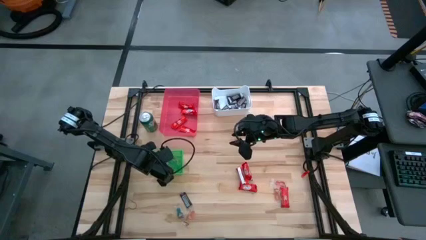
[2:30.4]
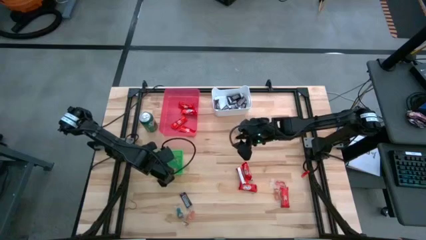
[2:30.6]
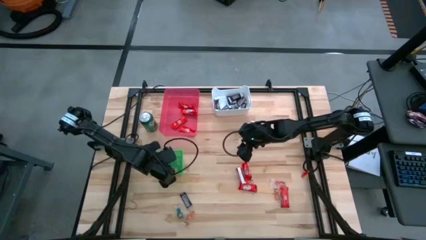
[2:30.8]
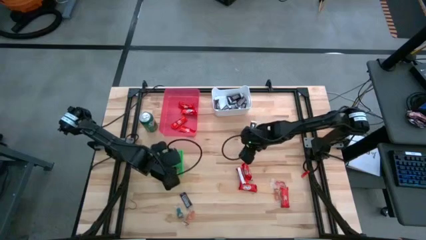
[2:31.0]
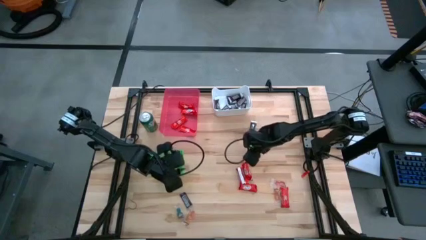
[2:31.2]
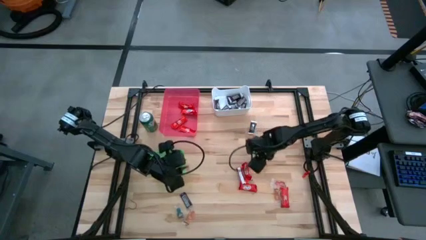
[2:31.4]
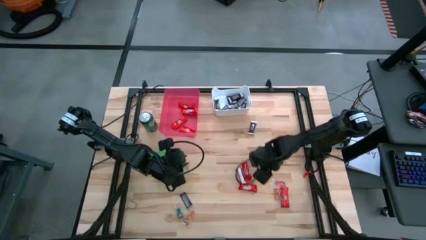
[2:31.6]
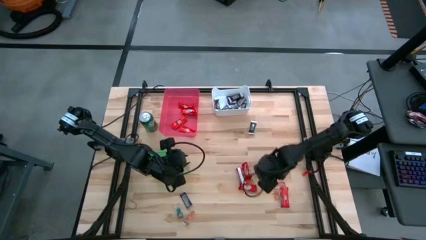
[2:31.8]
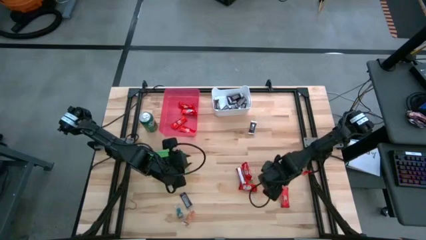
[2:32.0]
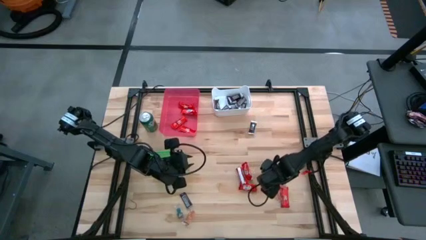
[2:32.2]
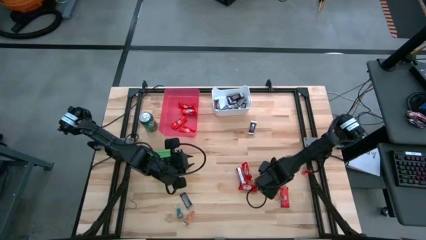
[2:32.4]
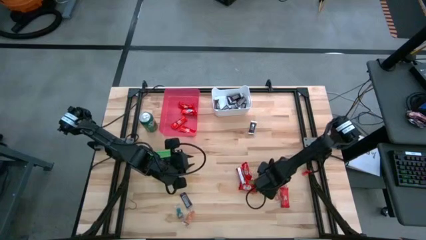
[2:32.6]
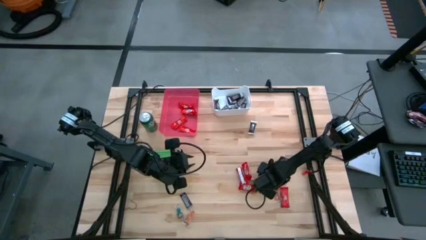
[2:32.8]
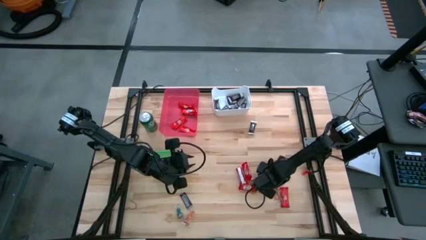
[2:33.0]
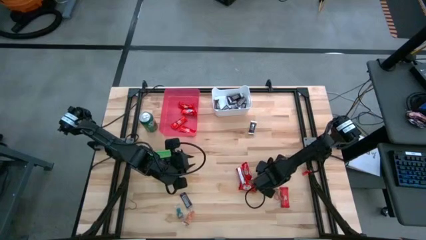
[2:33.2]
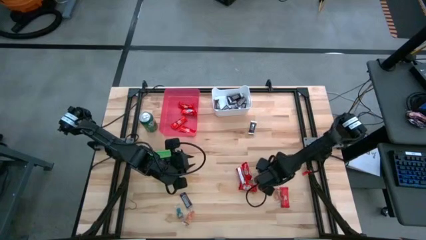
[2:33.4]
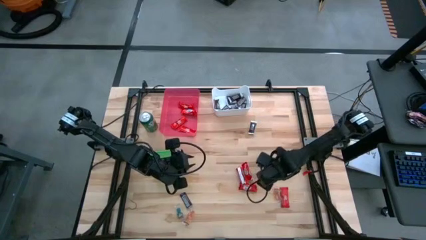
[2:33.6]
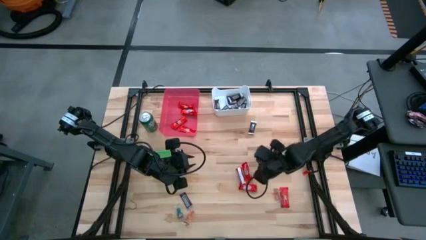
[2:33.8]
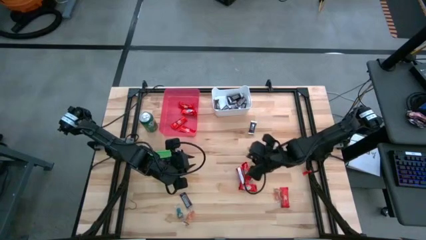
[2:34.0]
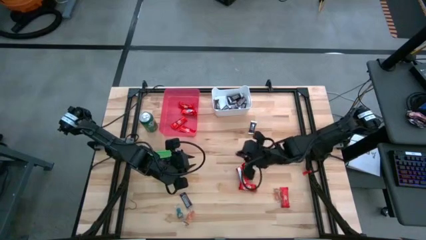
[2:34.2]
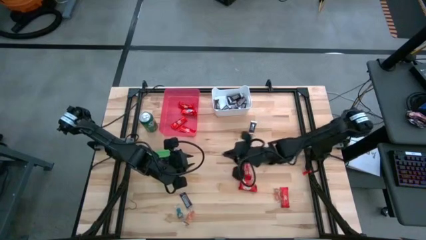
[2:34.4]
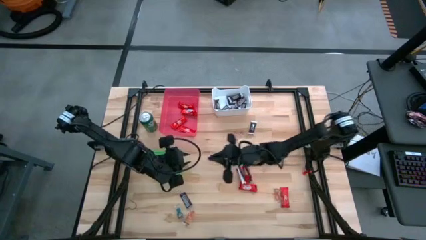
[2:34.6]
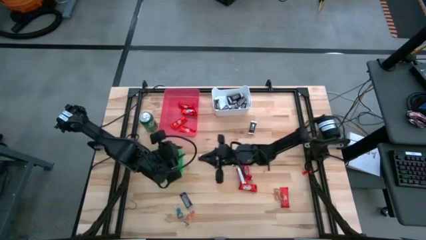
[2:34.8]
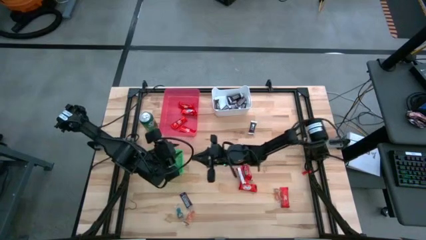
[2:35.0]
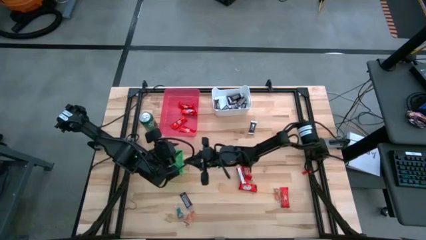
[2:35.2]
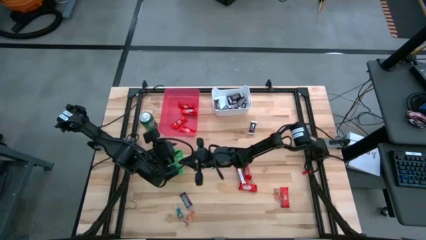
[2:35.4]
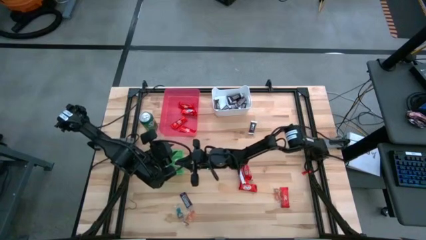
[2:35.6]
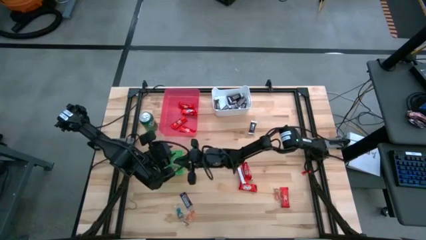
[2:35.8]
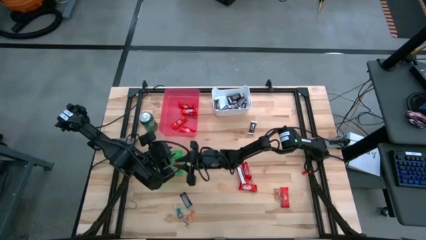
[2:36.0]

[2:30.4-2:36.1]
Task: Organize candy in baskets
Put the orange gummy into the green bin

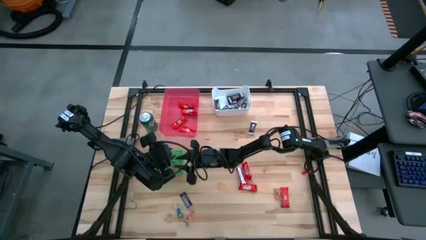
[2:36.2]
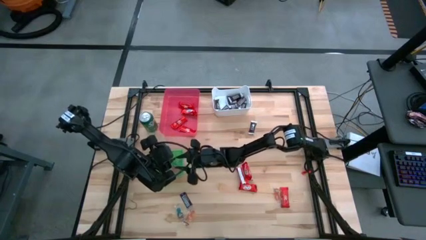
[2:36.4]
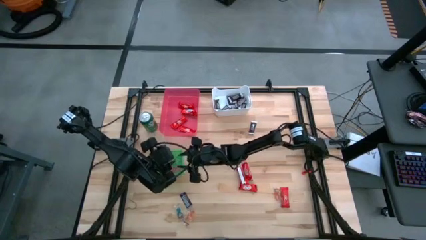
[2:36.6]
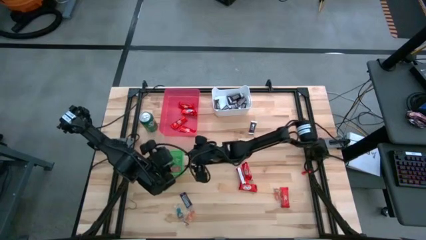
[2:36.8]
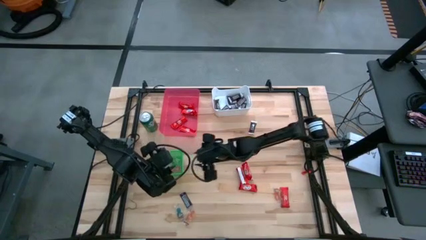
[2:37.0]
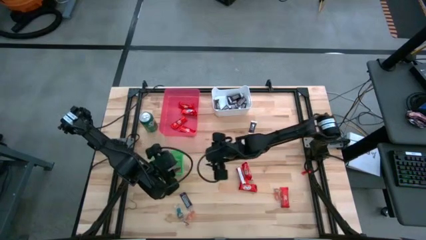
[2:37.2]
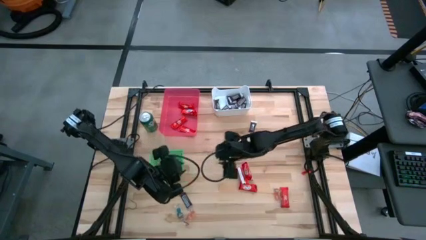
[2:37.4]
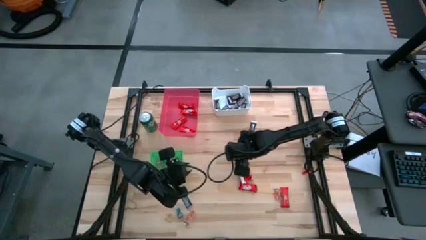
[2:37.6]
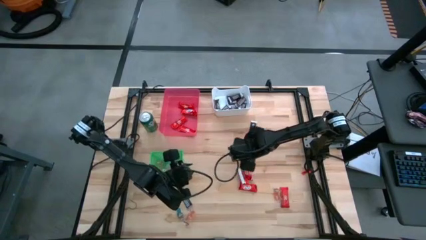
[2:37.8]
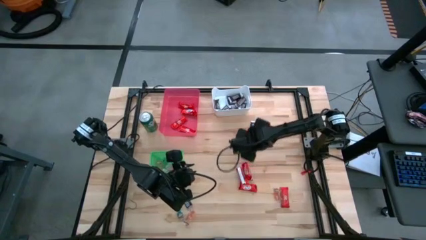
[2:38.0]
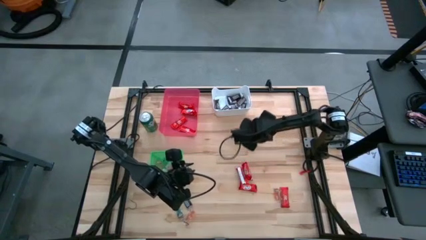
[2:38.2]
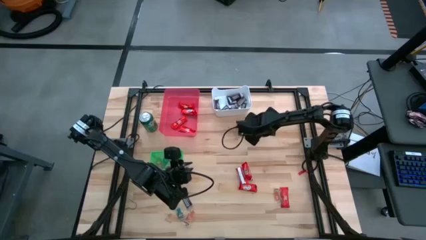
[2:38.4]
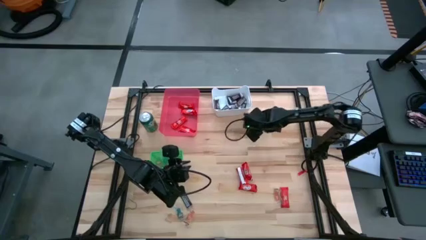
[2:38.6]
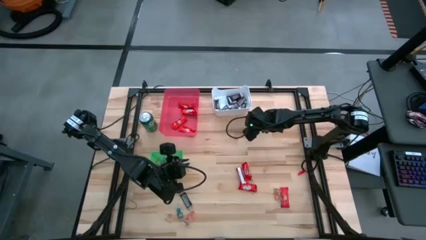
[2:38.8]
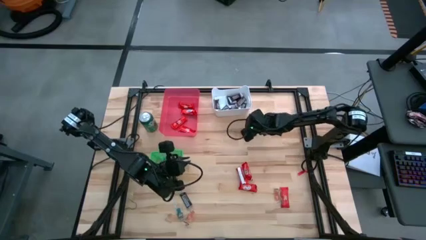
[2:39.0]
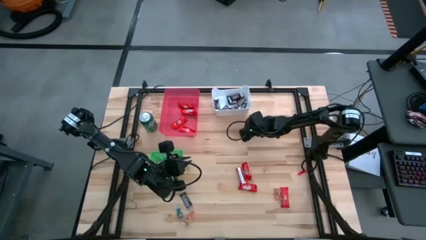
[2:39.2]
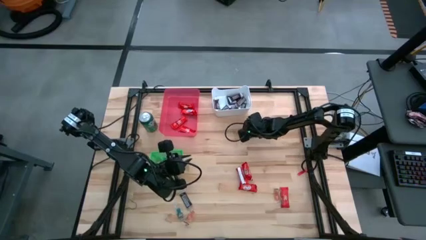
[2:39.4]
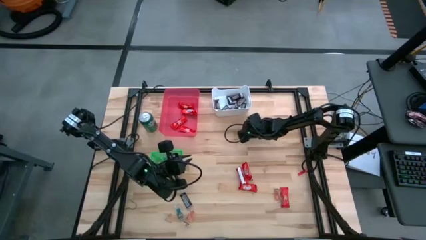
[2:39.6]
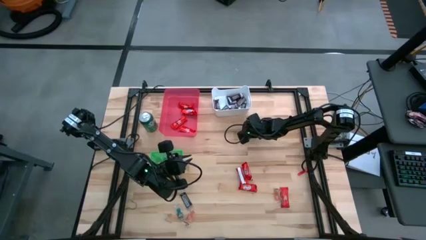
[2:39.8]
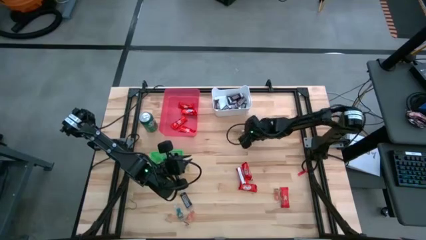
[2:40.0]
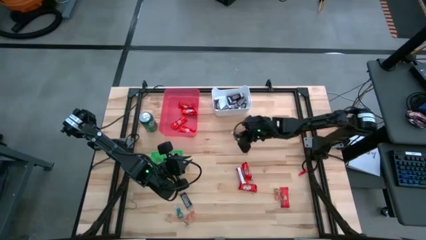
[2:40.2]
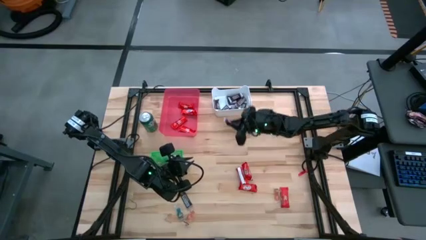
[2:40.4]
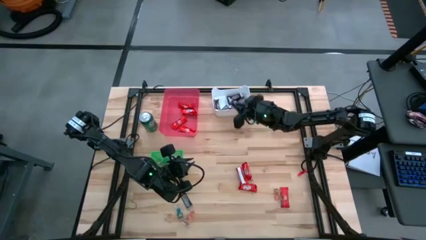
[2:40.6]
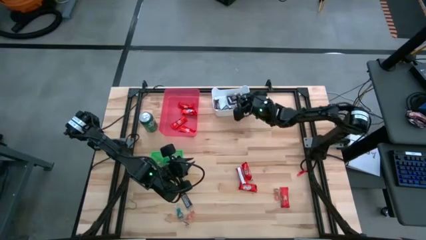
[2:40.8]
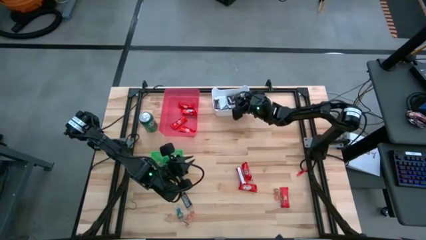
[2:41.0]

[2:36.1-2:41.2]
Put the brown chocolate into the white bin

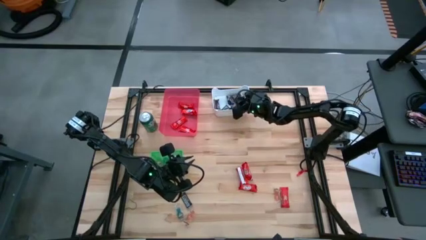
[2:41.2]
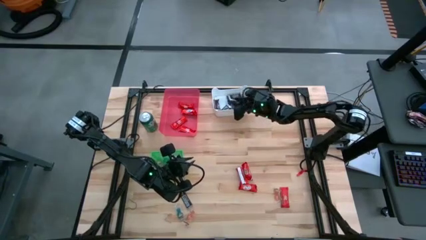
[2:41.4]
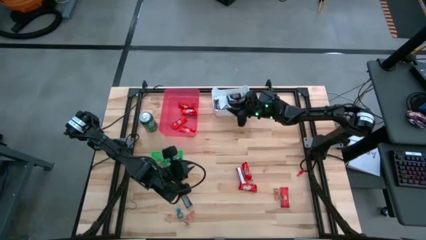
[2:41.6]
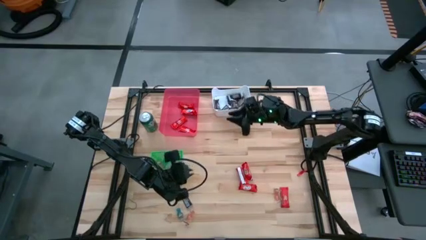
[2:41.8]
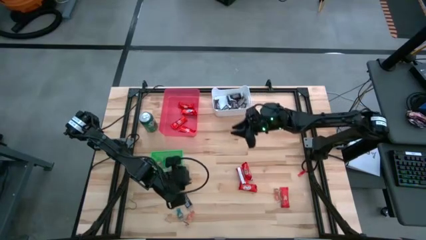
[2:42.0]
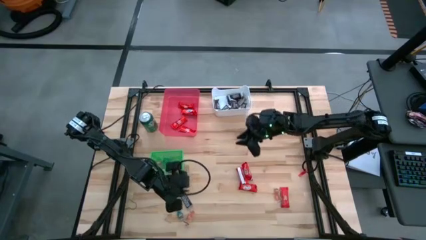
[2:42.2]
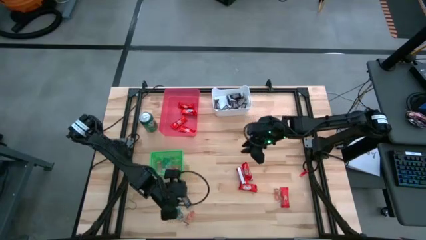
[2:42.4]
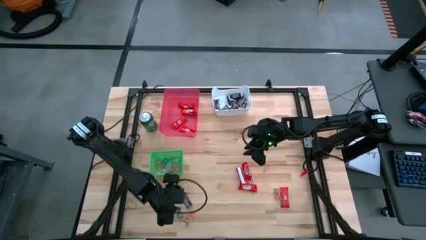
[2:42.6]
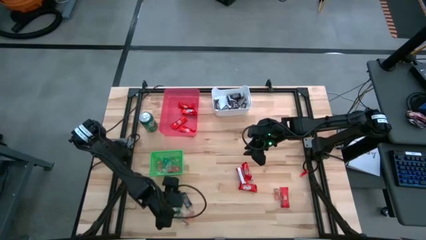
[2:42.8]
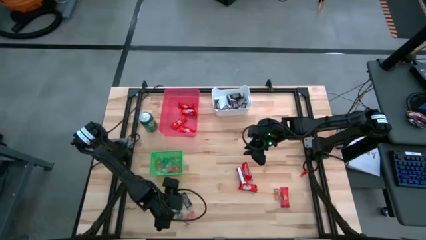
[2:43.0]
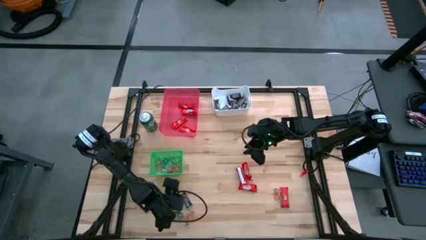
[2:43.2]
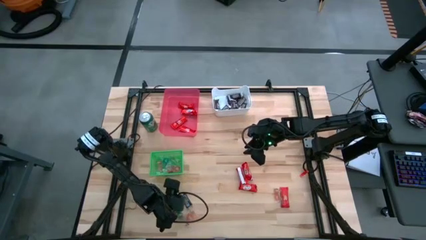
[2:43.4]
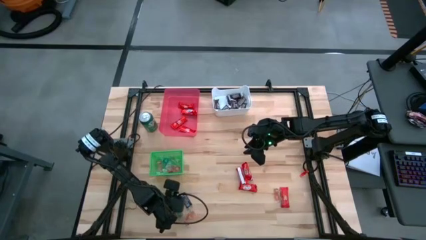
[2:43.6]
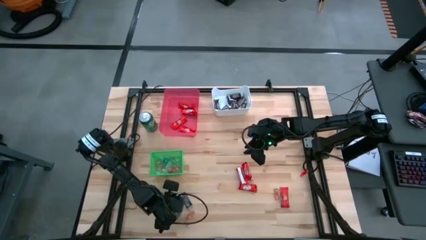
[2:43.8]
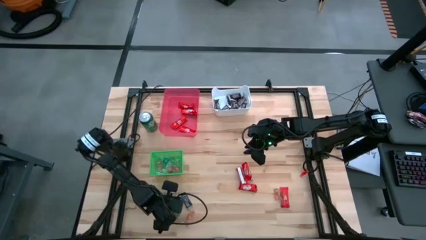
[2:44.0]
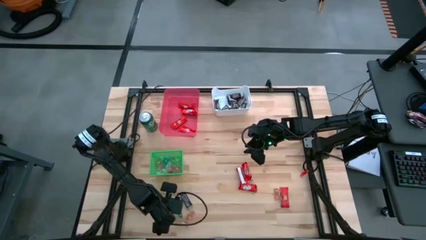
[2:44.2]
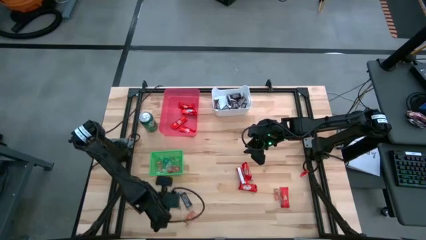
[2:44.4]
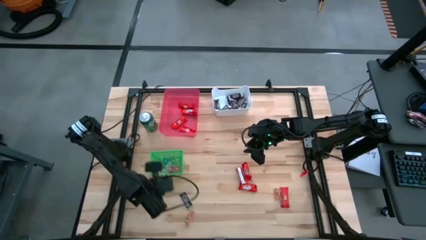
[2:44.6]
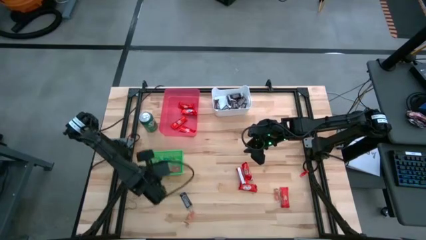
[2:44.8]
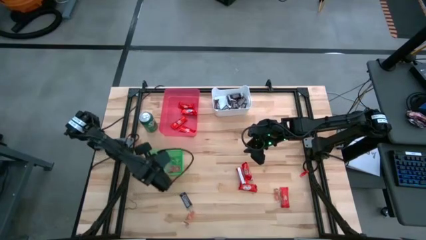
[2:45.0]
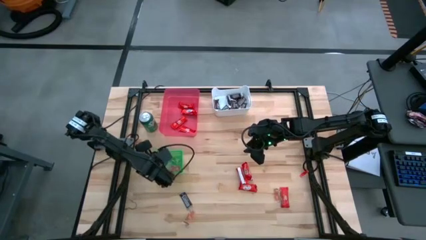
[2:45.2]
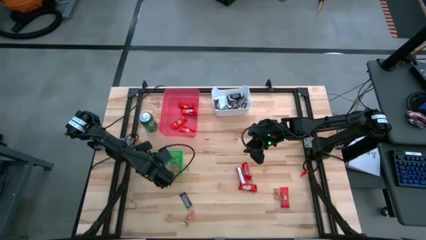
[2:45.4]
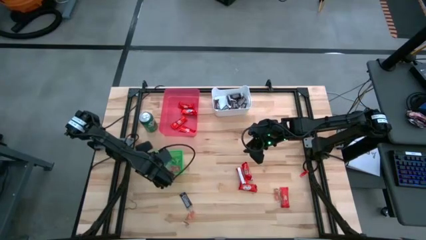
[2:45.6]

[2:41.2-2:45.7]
Put the blue gummy into the green bin
